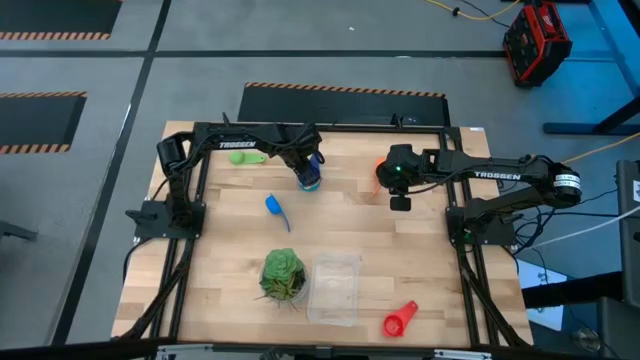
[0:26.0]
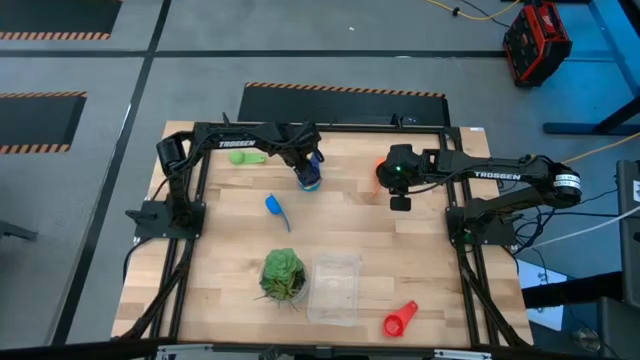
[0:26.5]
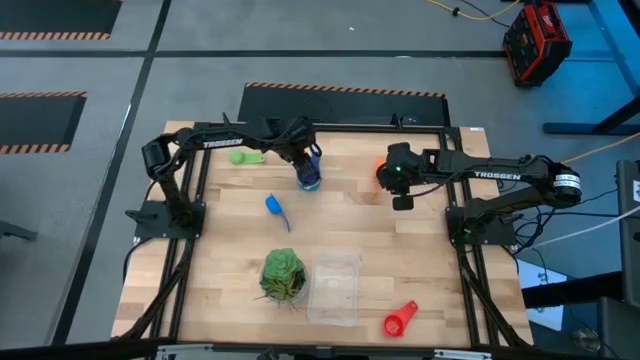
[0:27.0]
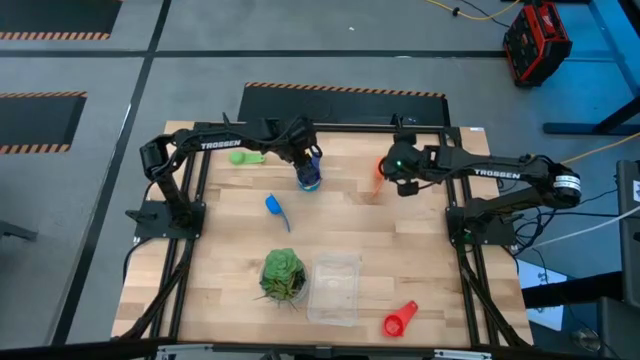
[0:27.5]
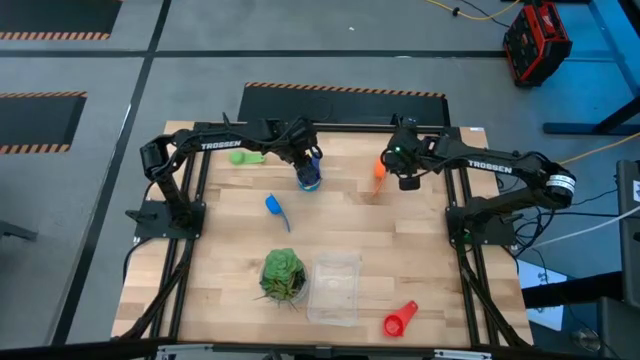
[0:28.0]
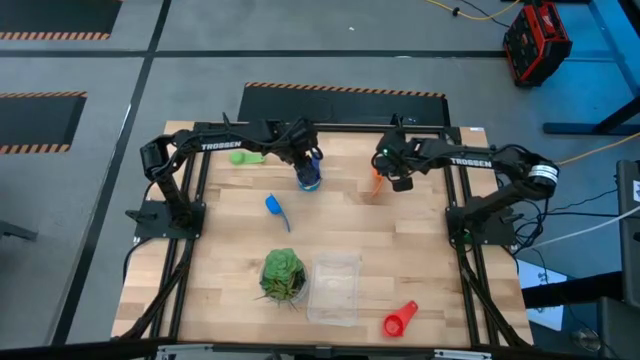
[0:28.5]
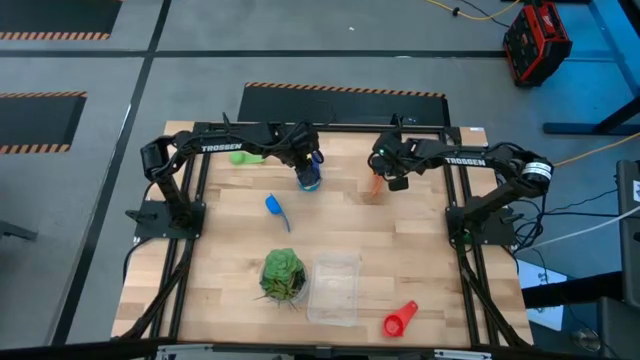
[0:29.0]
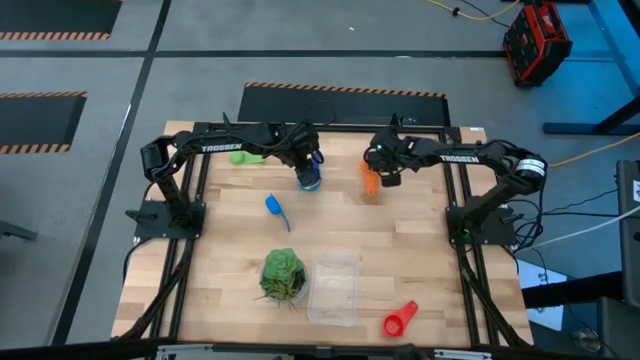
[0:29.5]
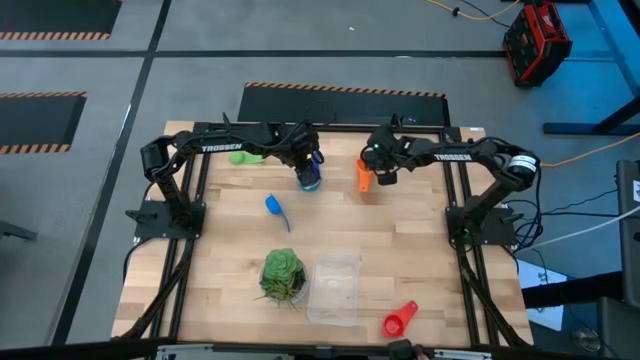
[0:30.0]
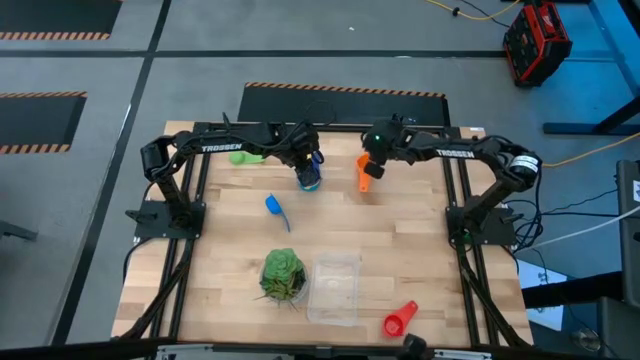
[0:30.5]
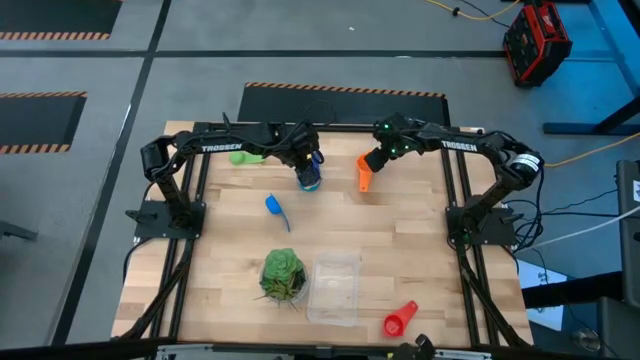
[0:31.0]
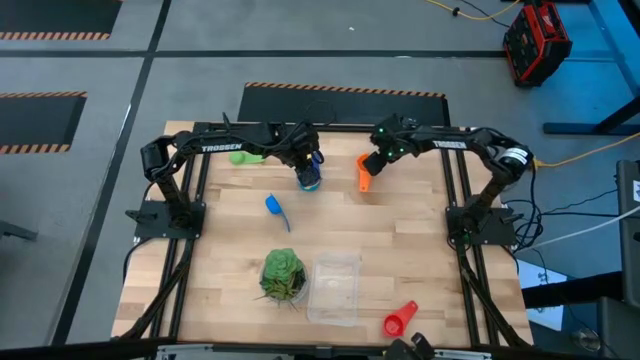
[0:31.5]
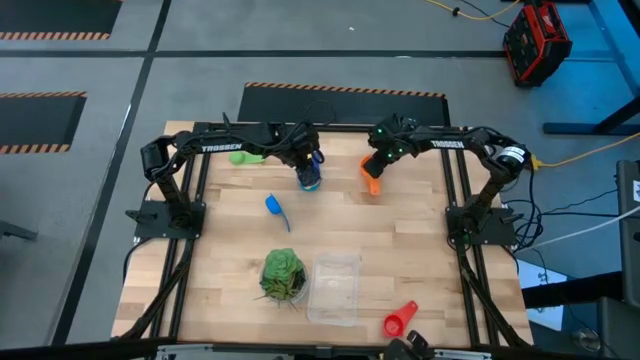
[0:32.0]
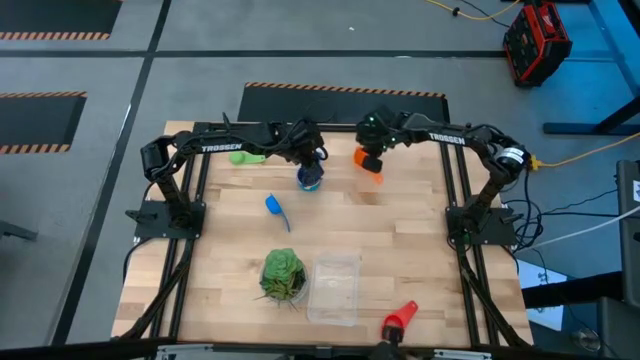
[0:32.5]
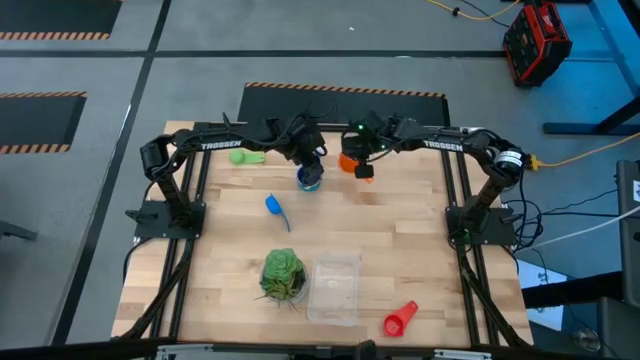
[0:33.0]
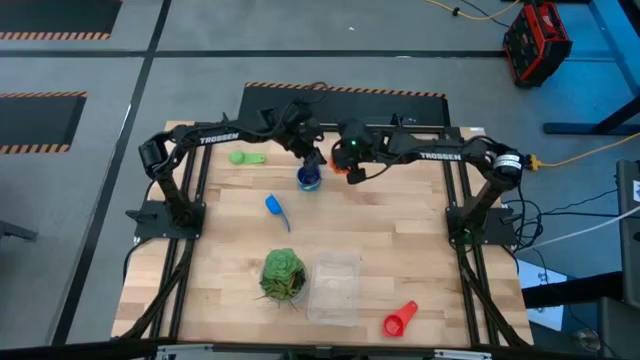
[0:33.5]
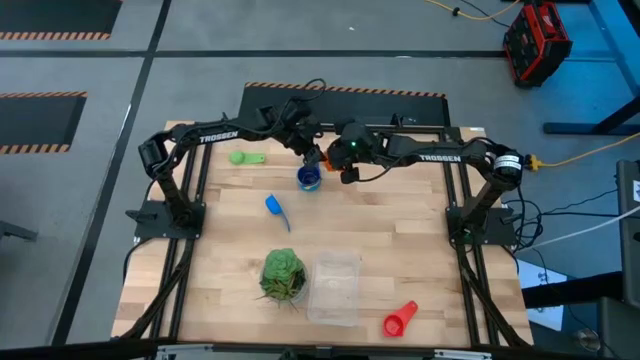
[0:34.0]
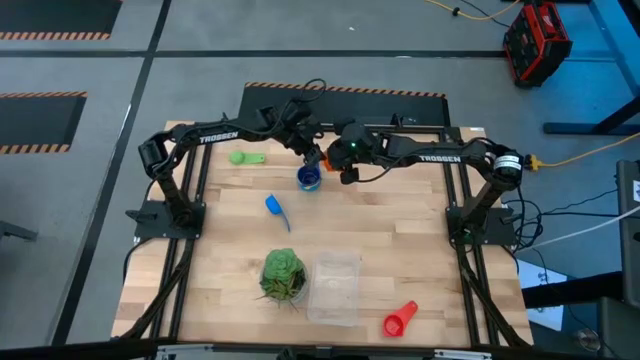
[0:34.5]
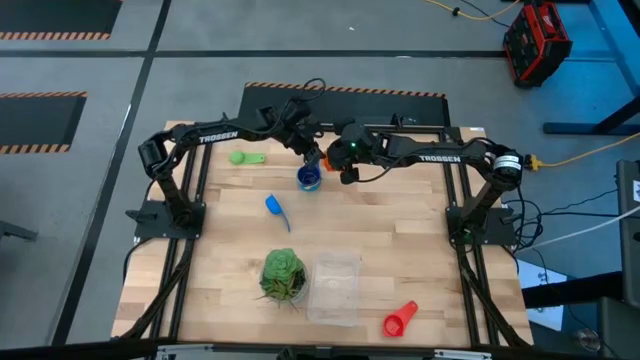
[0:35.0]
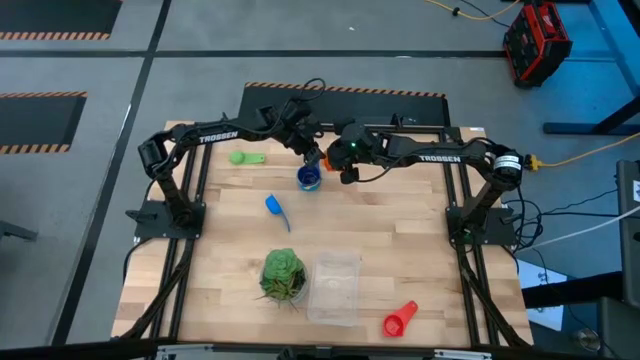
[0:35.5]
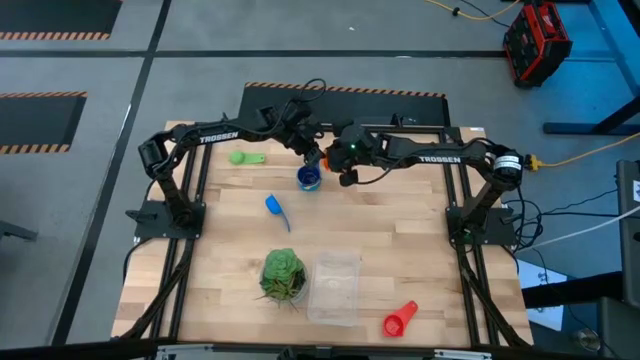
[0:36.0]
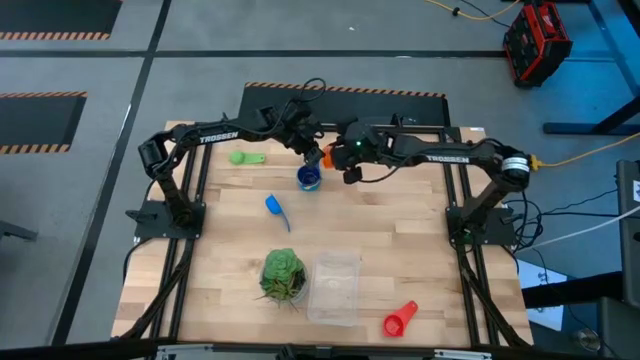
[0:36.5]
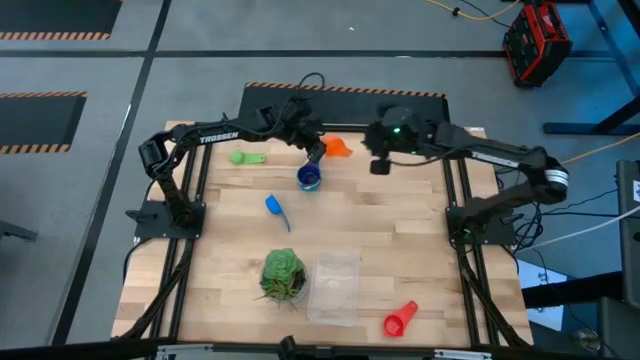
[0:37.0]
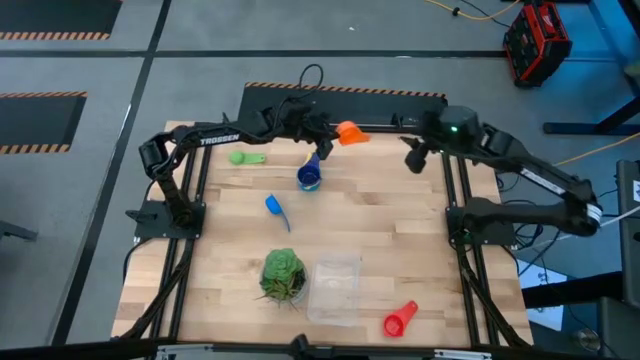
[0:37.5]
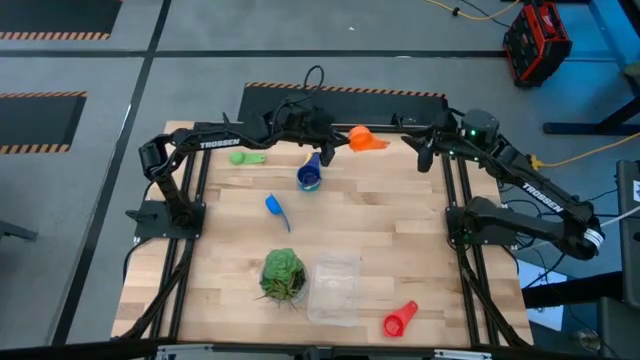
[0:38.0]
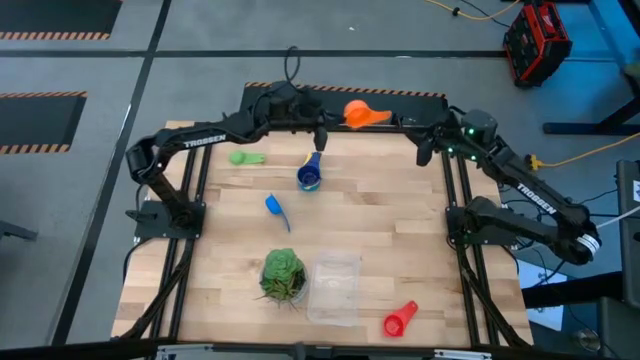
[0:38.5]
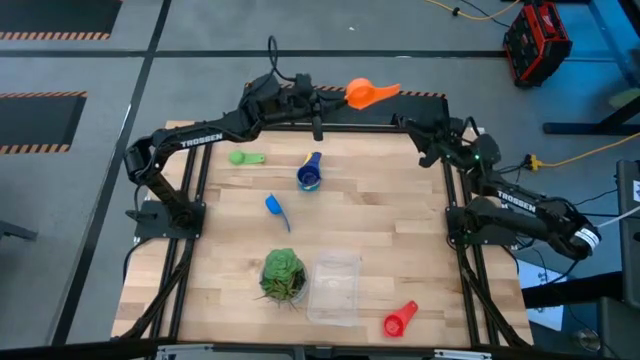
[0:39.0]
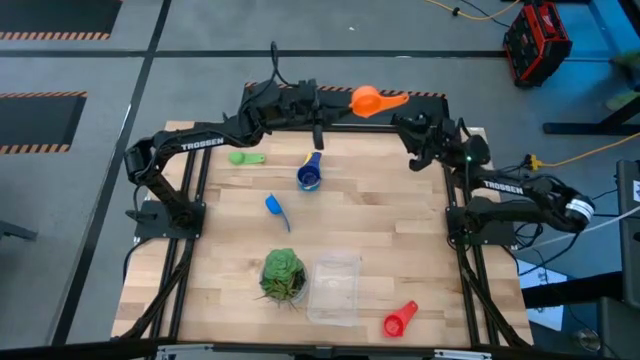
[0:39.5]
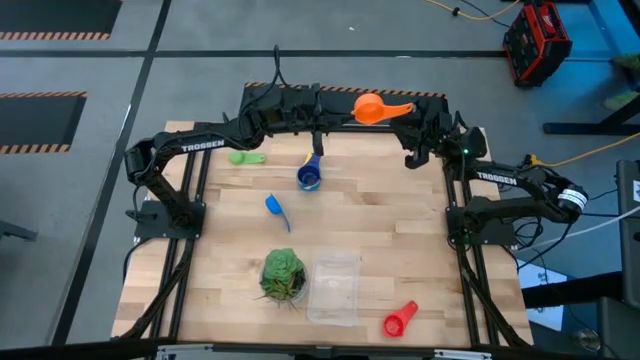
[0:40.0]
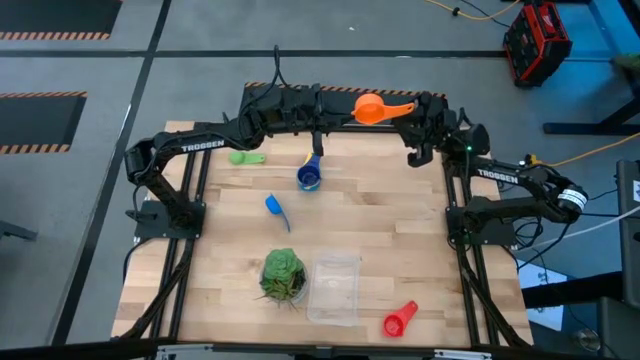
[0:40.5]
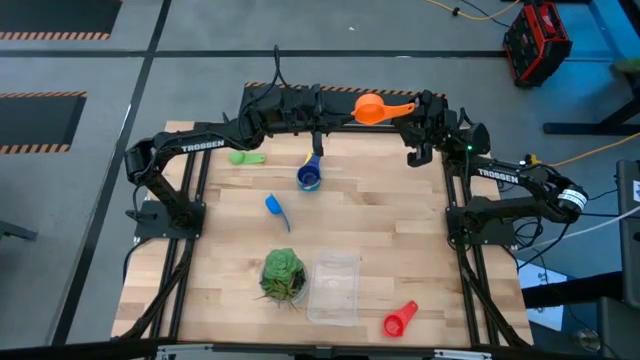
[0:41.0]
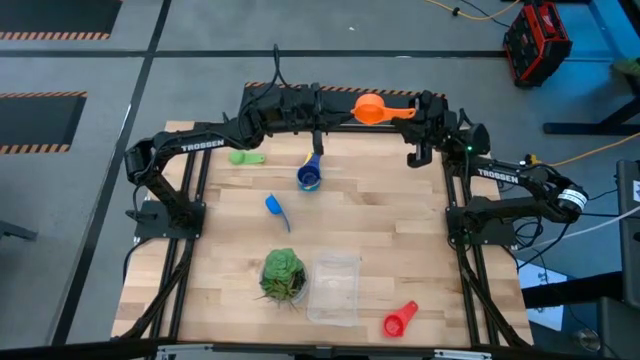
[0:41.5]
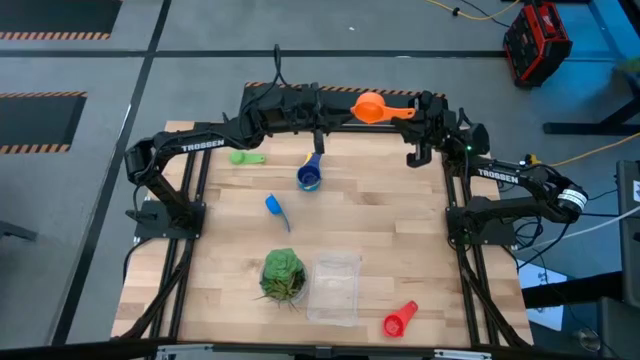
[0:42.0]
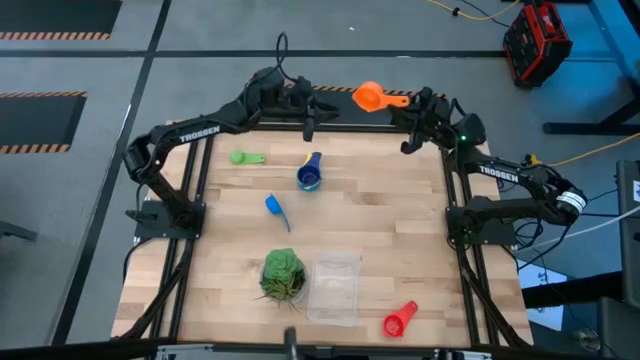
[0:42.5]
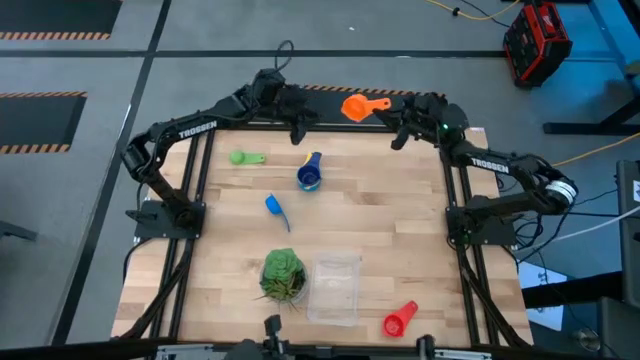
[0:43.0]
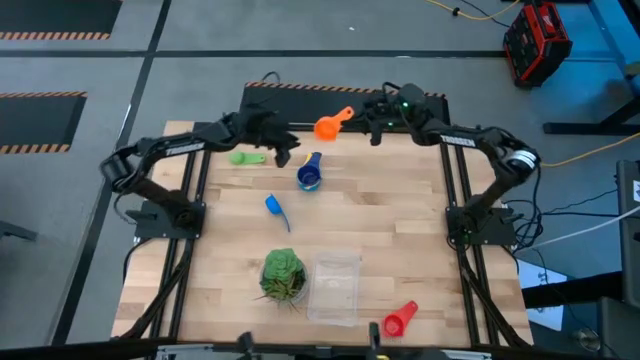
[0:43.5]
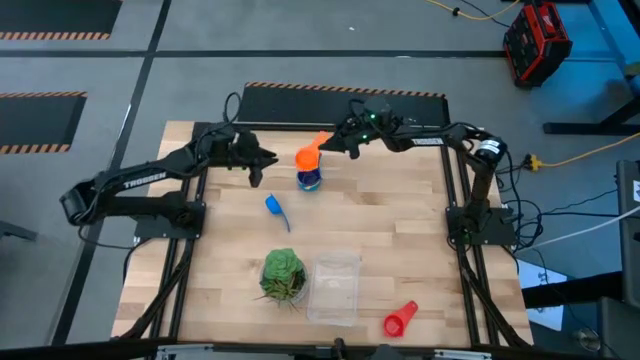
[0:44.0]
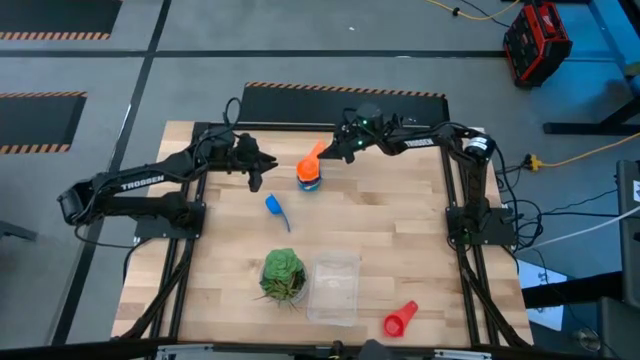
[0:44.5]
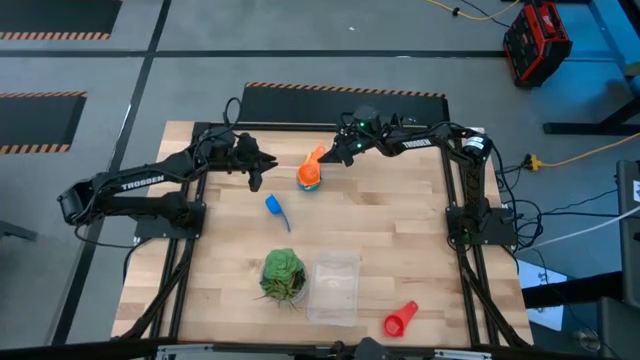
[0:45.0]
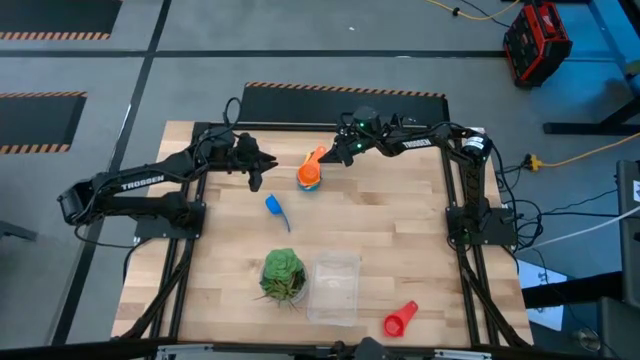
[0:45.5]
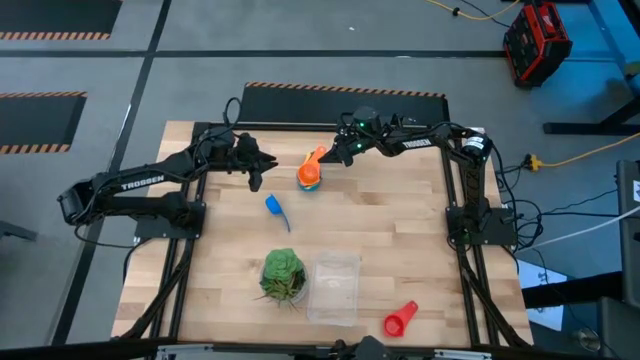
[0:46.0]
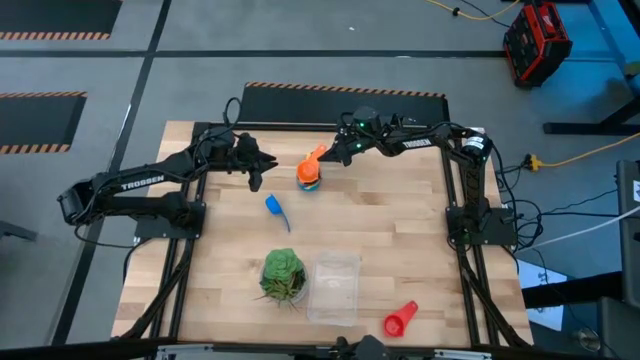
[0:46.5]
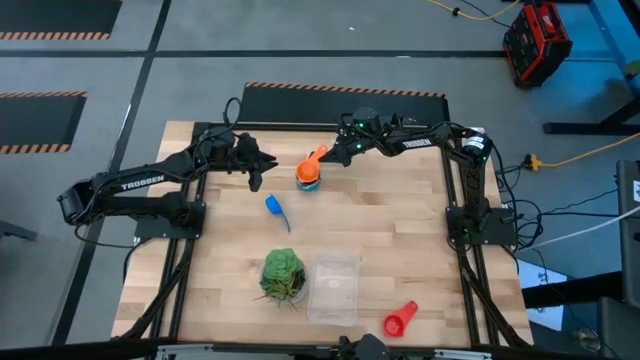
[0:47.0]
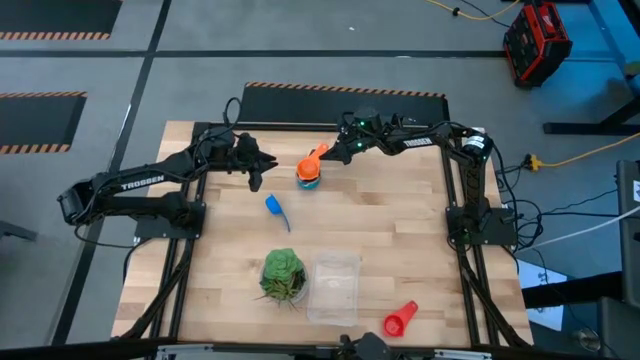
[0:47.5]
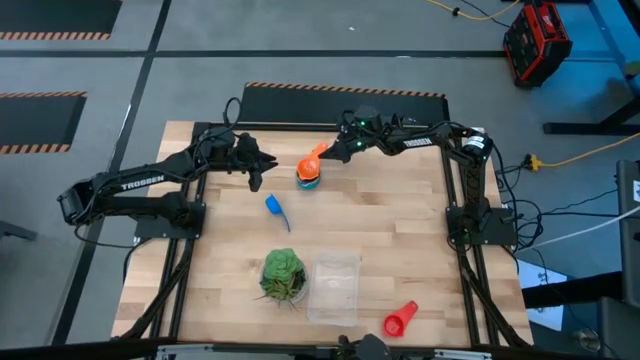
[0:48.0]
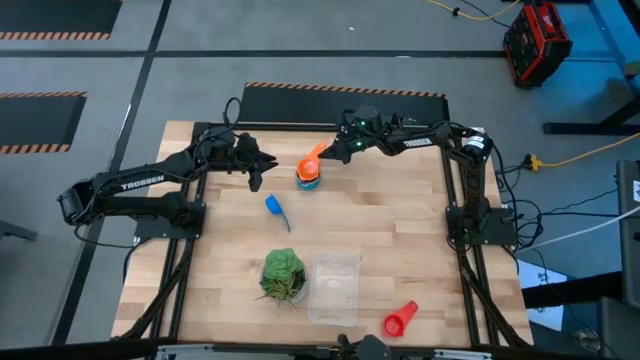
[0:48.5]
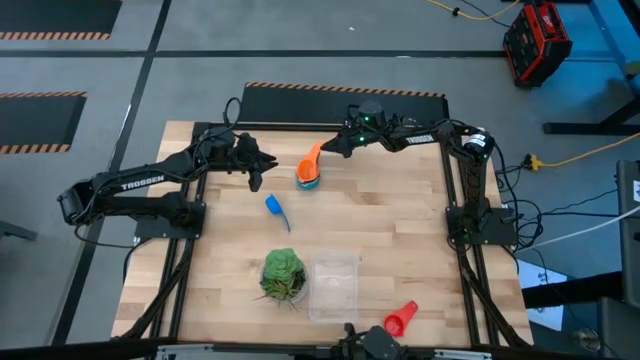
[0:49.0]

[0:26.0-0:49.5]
Task: Nest measuring cups in basket
Stack the orange measuring cup on top of the dark blue measuring cup
